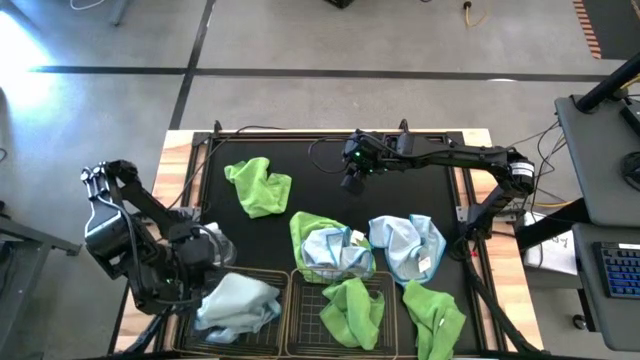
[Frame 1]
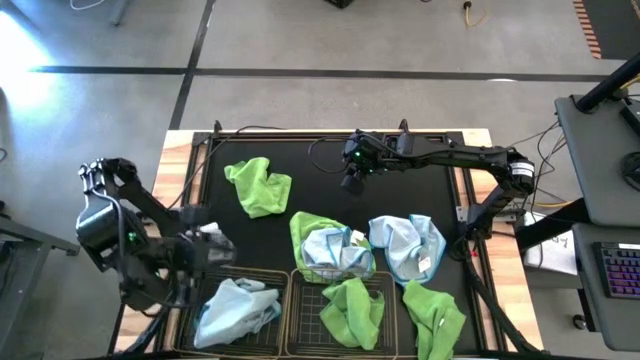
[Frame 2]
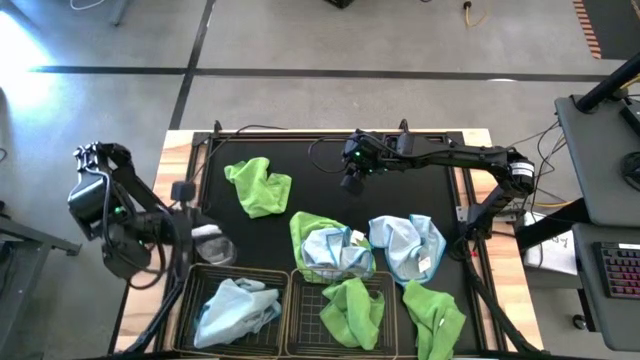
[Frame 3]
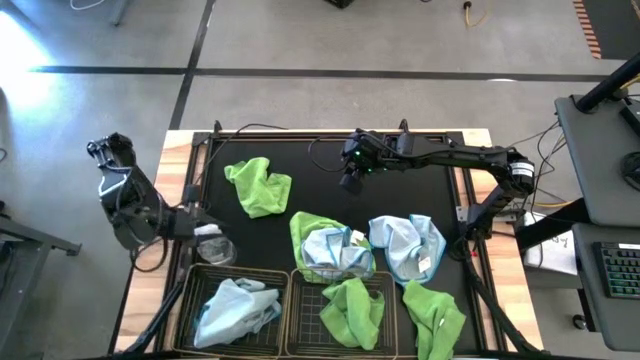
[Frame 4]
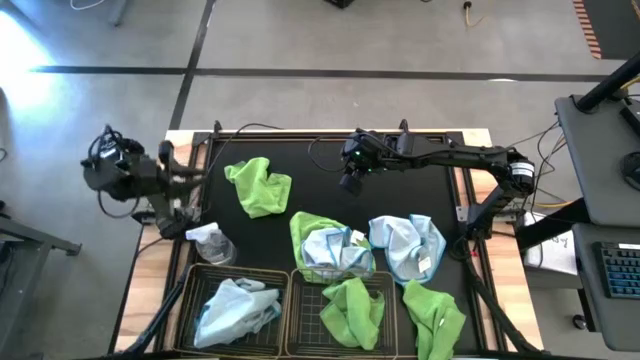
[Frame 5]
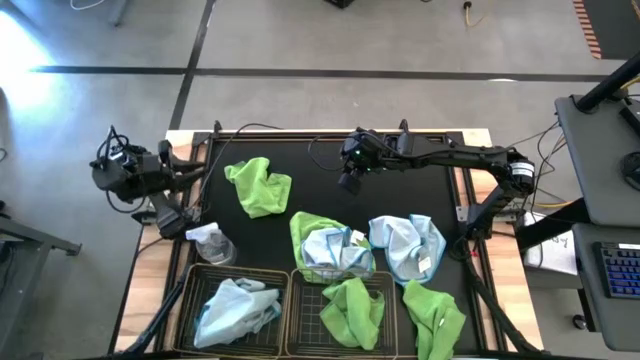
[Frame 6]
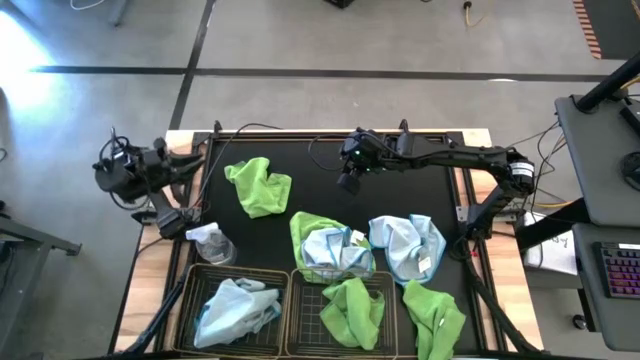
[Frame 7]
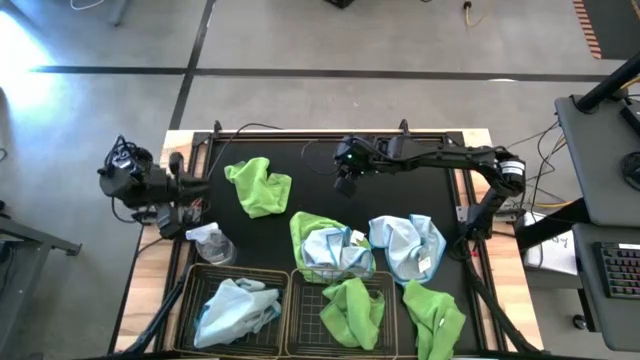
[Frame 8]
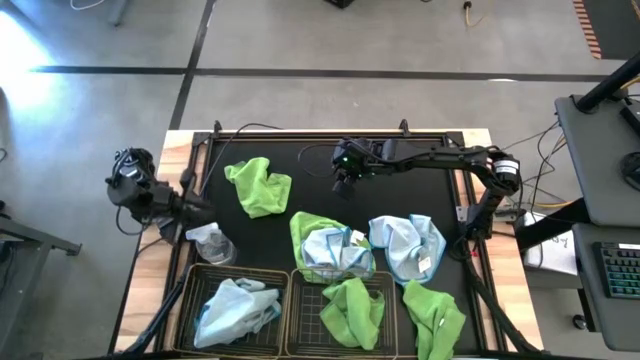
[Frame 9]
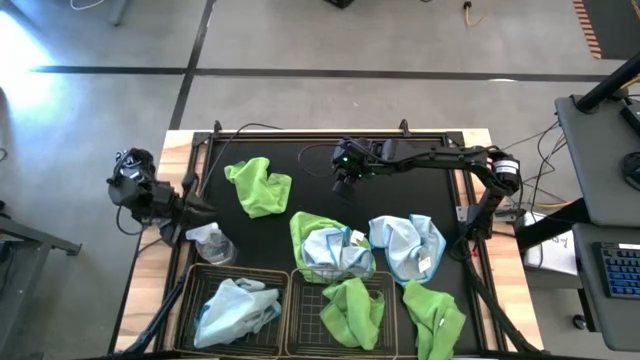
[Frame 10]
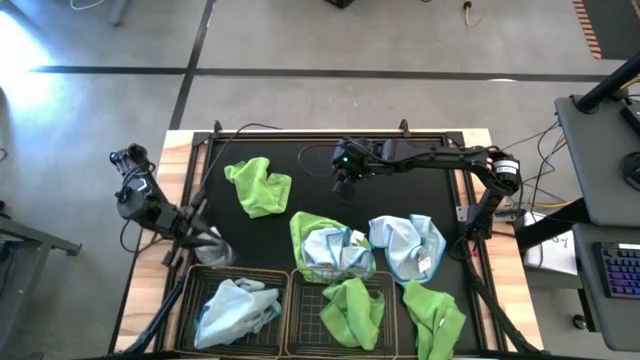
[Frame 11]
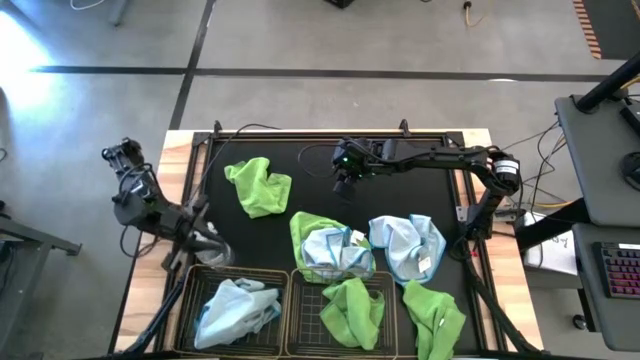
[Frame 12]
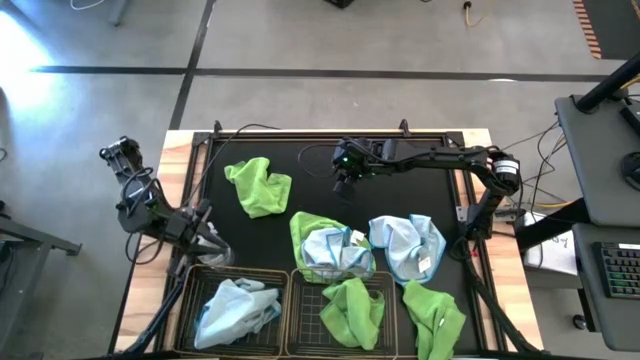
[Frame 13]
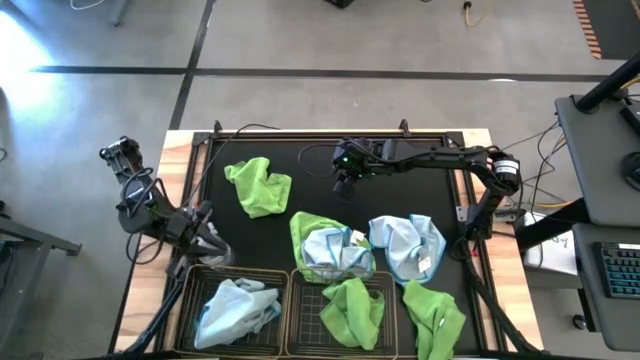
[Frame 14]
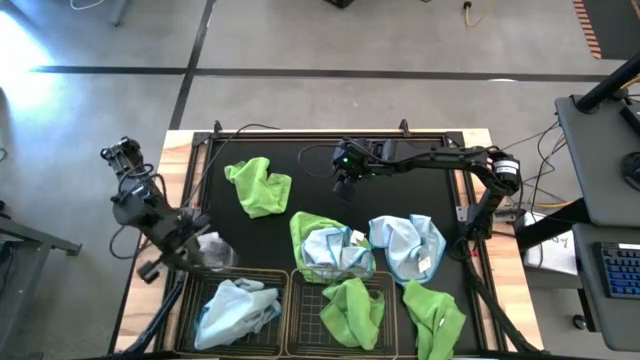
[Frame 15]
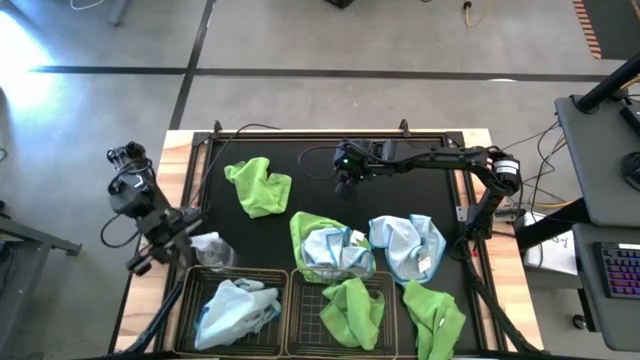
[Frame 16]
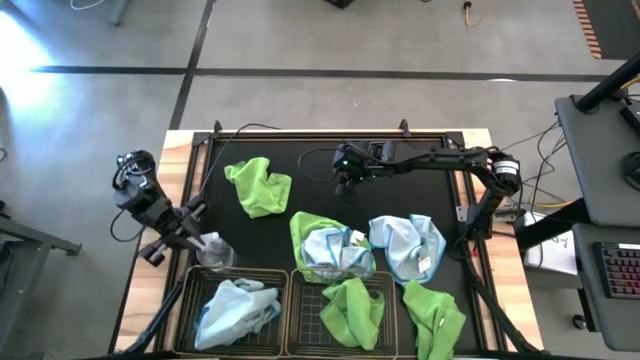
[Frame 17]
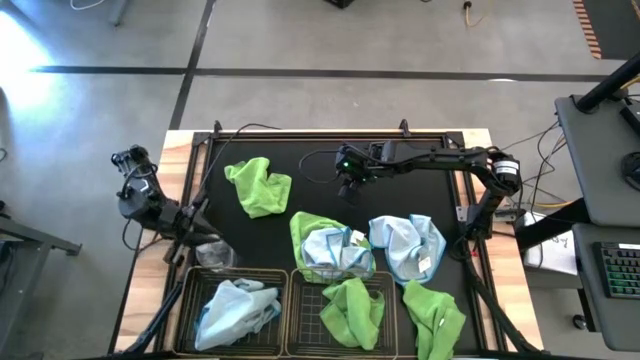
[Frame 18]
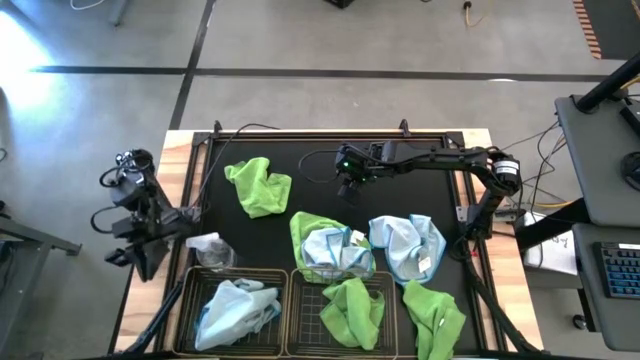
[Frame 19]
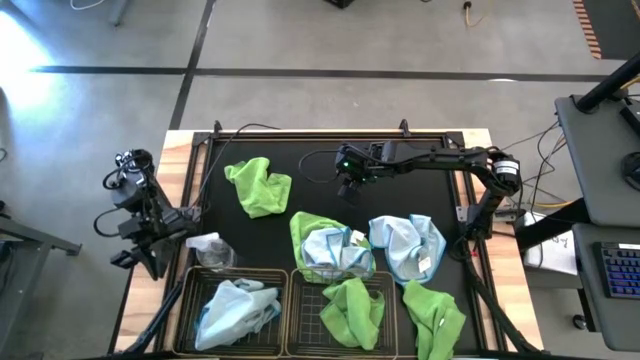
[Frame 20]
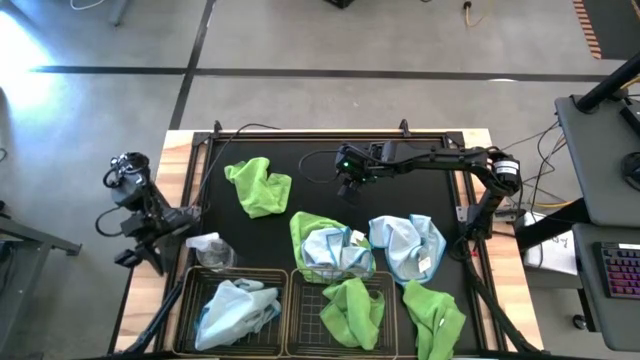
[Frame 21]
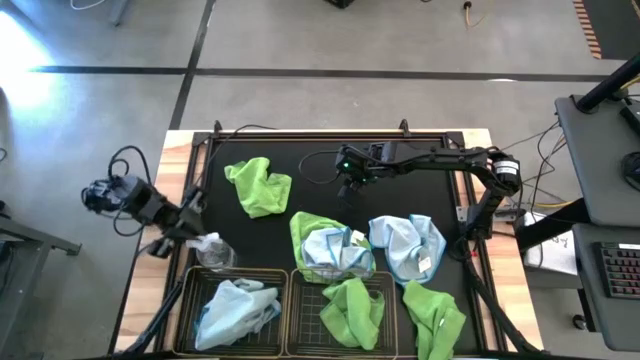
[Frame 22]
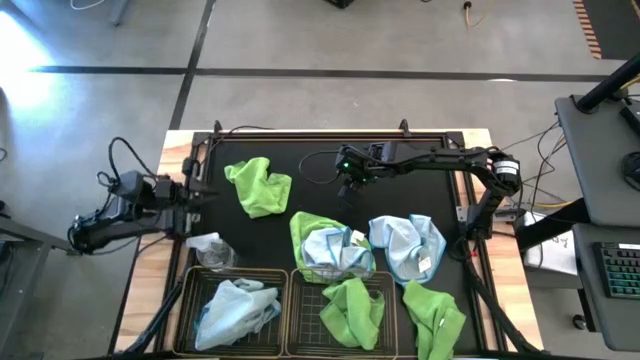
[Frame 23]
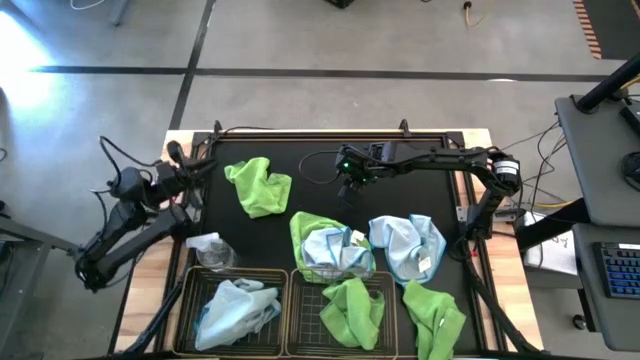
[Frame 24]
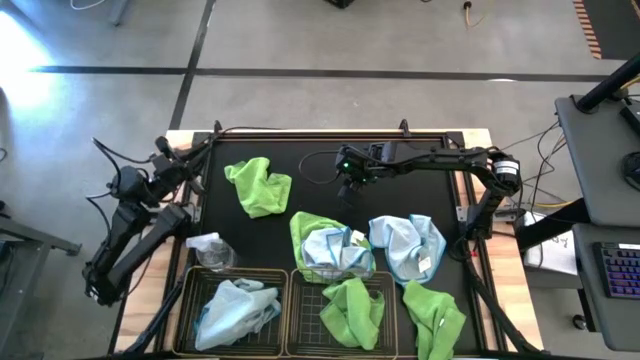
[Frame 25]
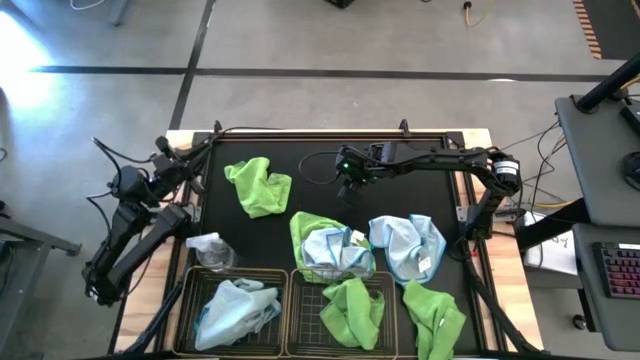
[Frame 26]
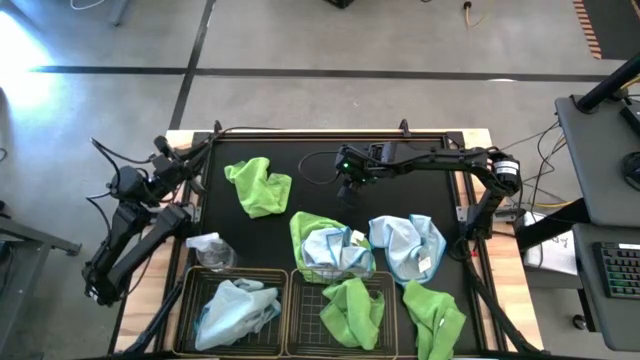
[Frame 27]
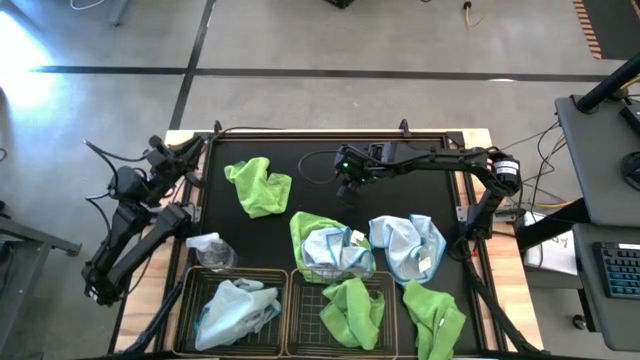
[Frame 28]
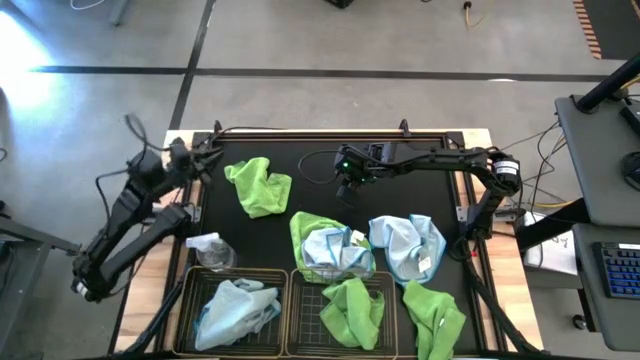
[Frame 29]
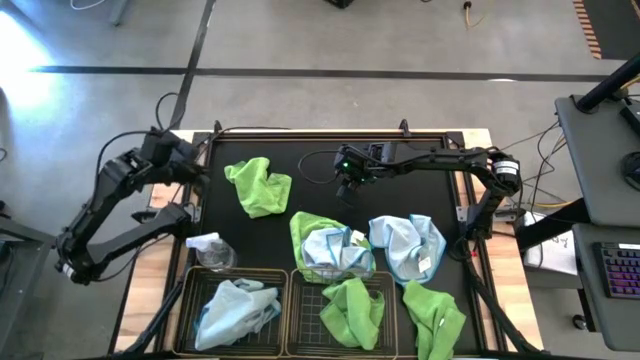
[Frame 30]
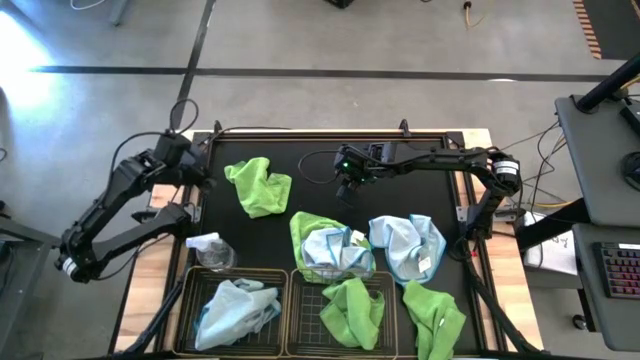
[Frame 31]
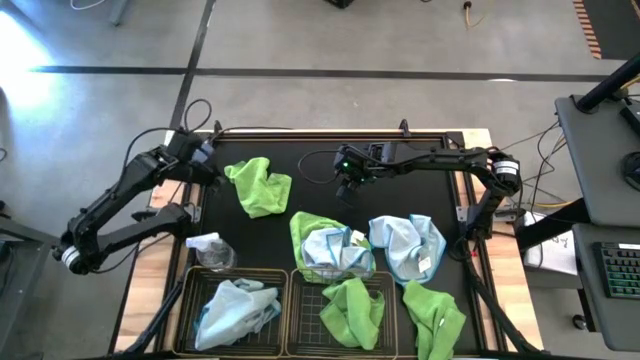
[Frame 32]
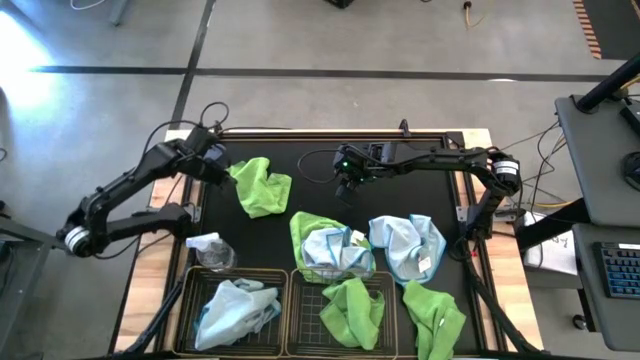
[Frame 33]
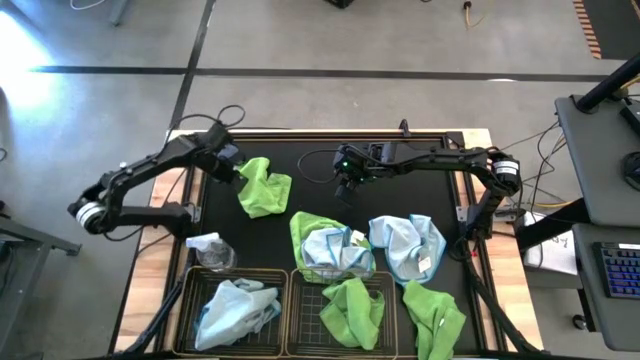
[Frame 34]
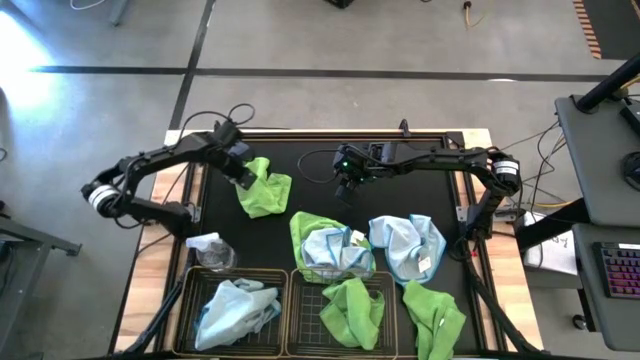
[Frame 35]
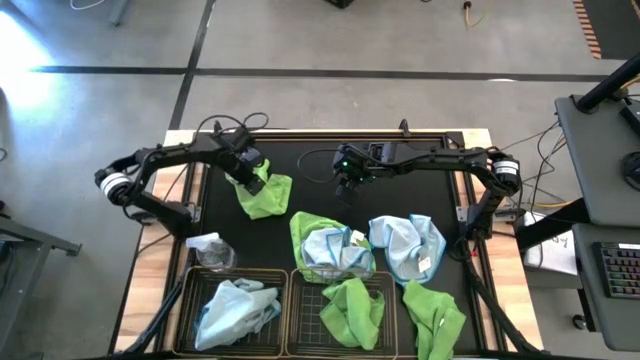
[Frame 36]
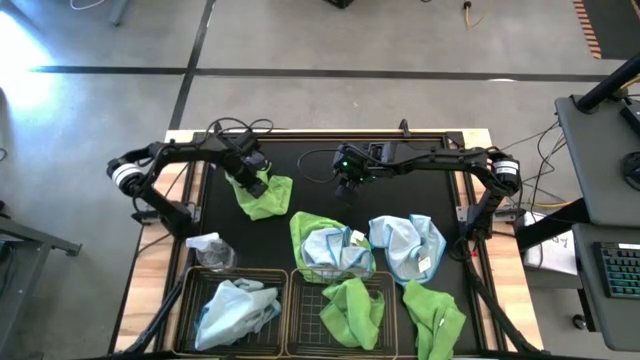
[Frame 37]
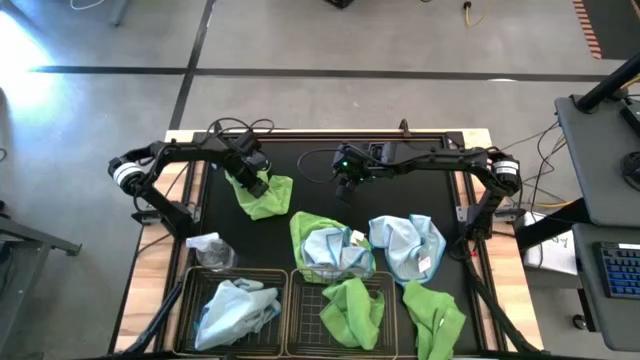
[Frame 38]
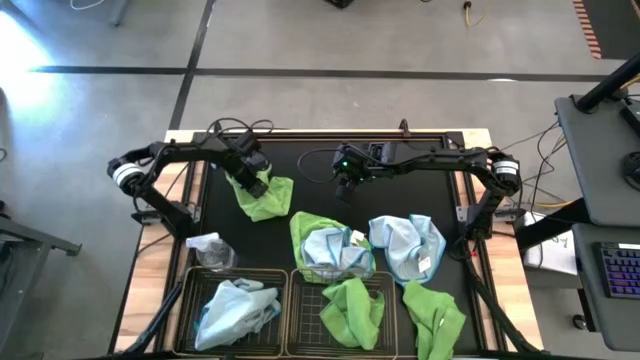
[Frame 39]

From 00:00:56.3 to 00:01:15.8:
Task: Sort microfiber towel by color & place in baskets
Put the top green towel from the left to the right wire basket

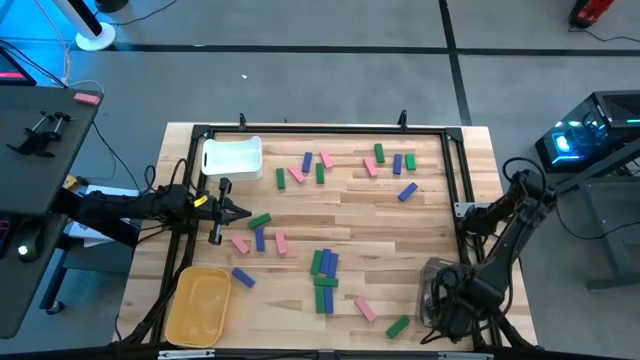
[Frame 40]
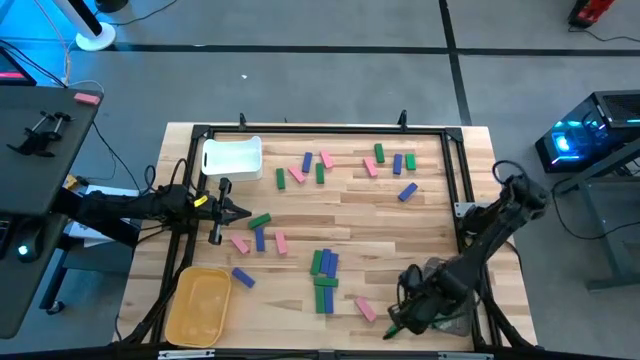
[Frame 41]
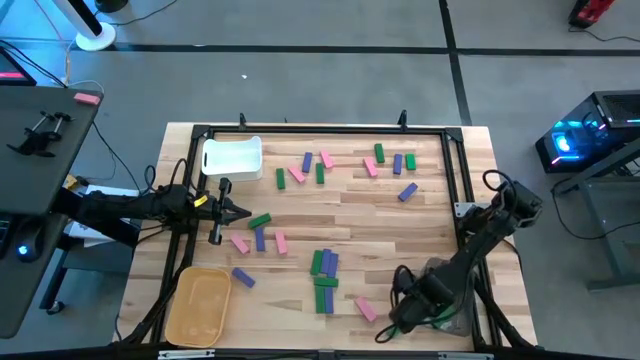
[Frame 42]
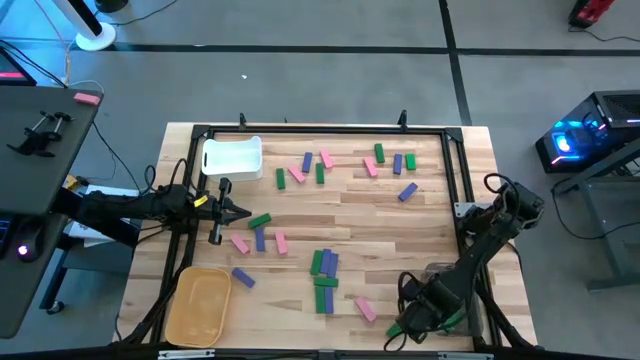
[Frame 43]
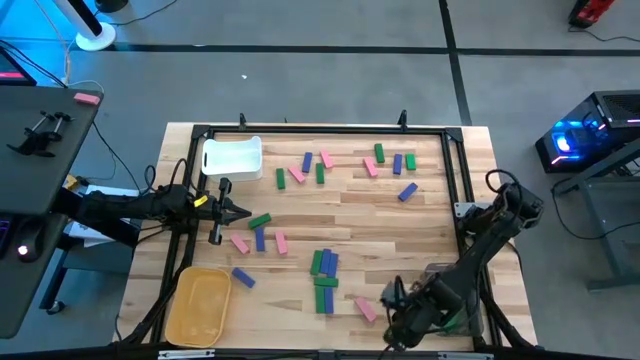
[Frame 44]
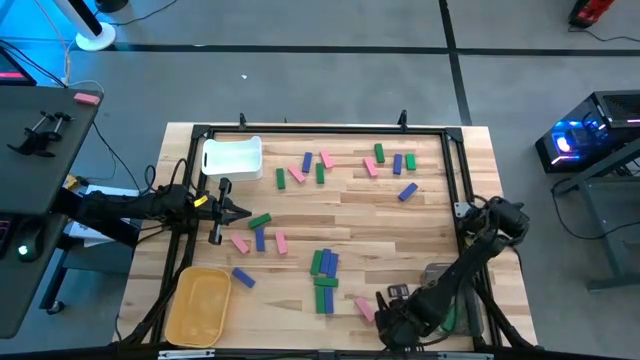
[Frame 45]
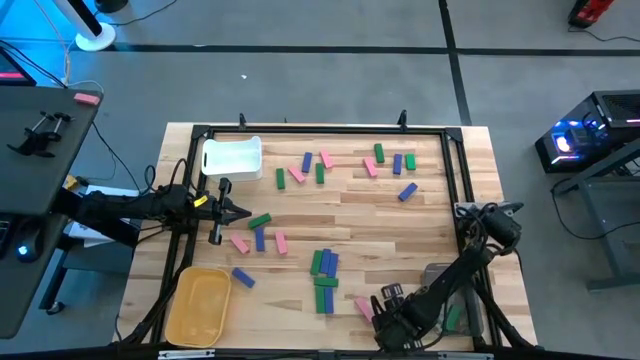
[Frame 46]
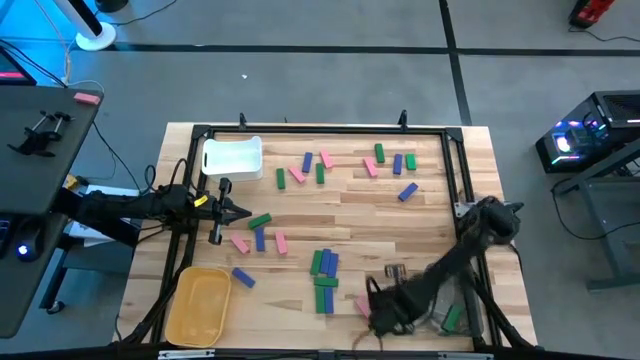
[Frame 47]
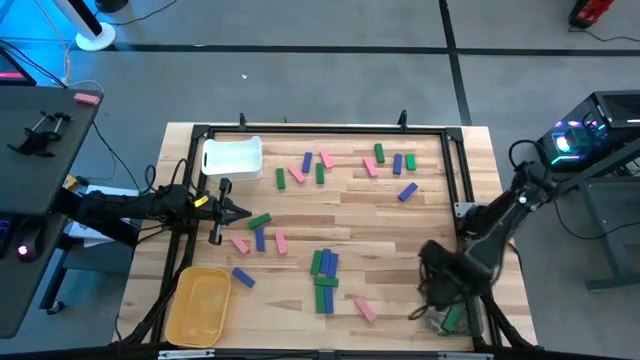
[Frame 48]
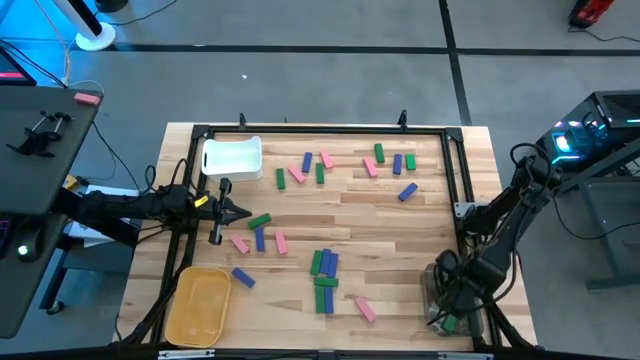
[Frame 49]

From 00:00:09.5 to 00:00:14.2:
Task: Sort blocks
Put the green block into the black transparent bin
